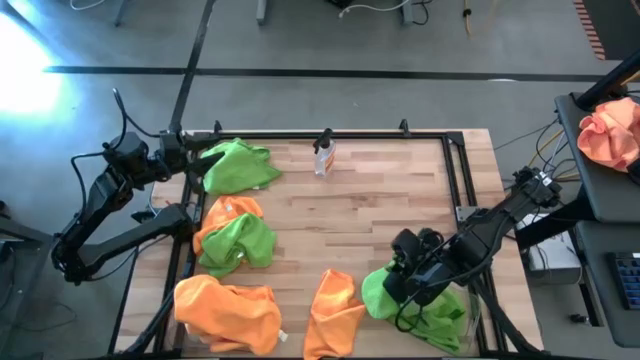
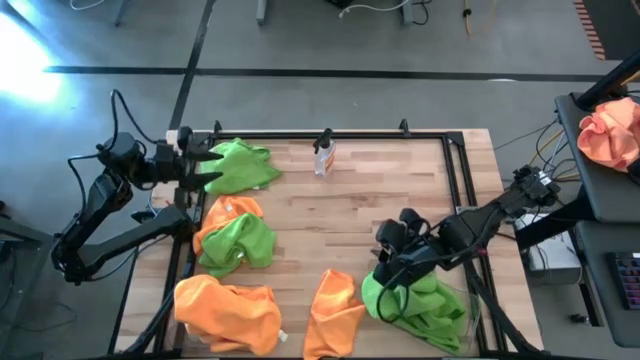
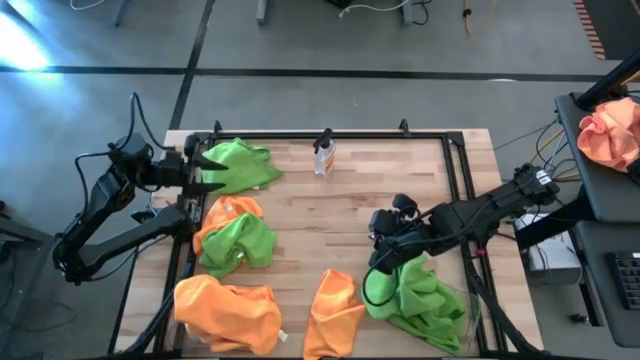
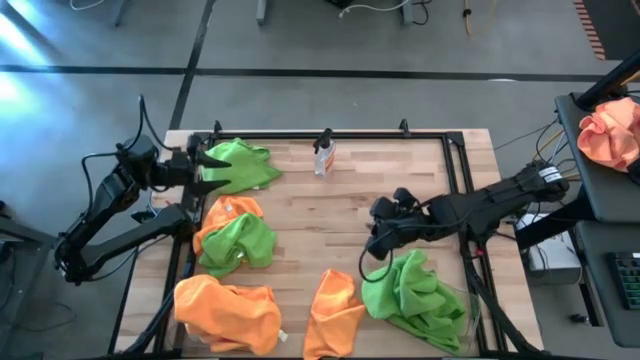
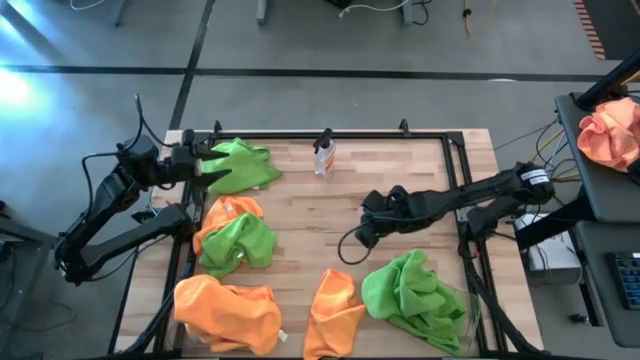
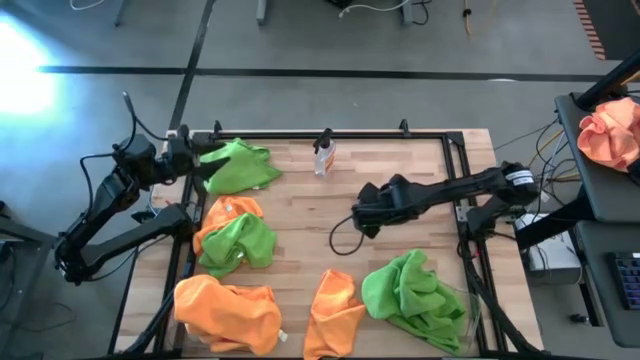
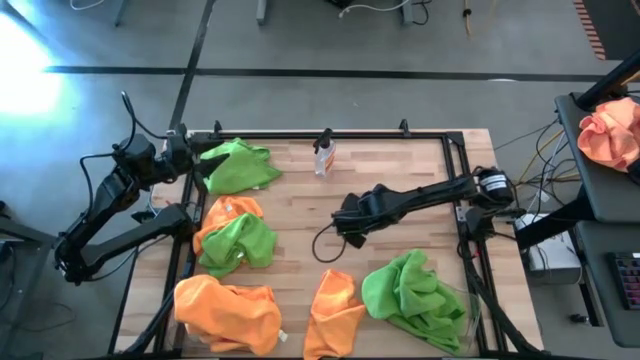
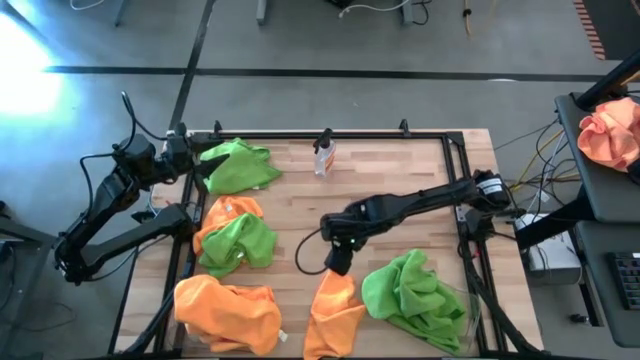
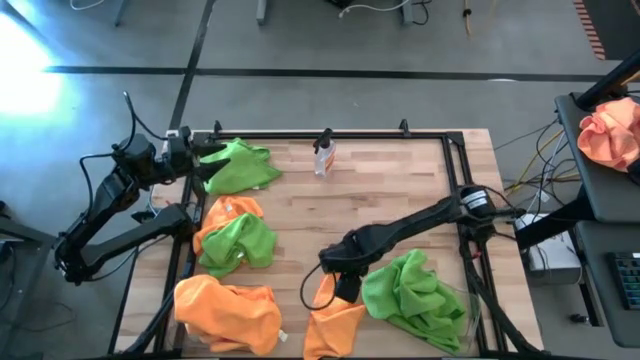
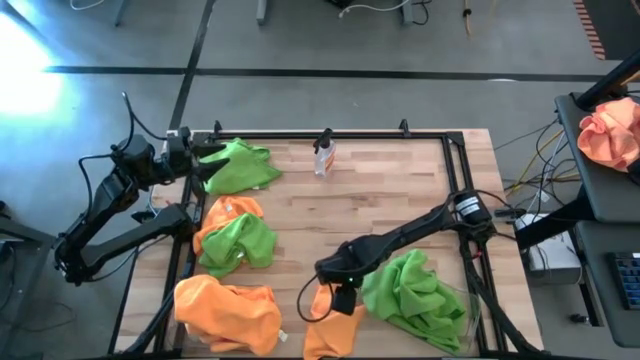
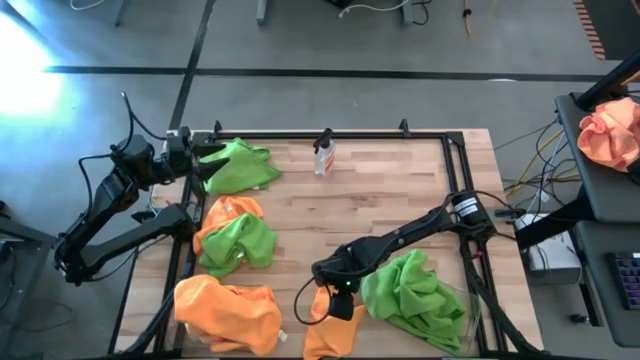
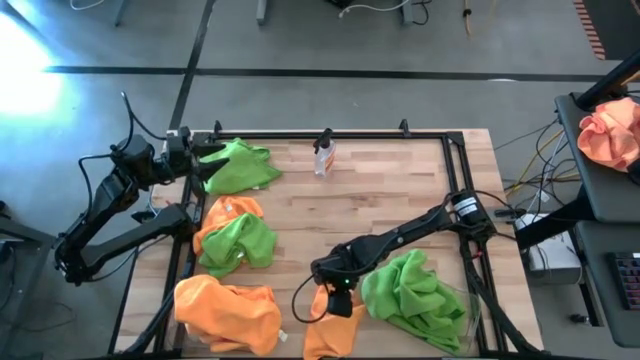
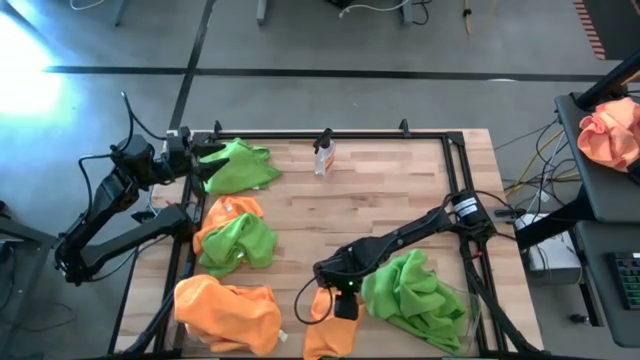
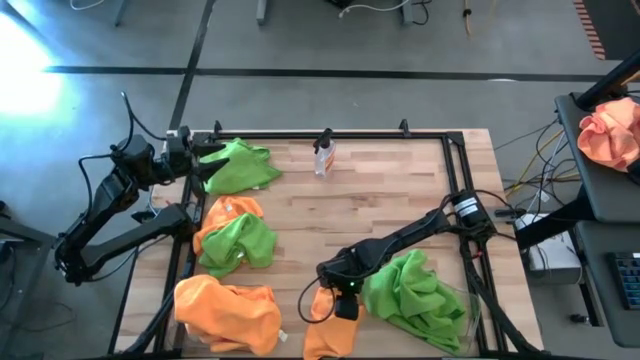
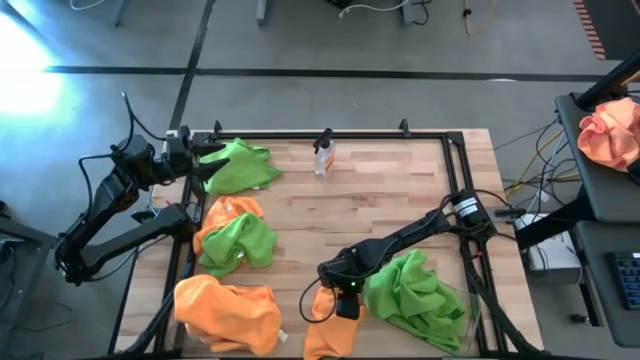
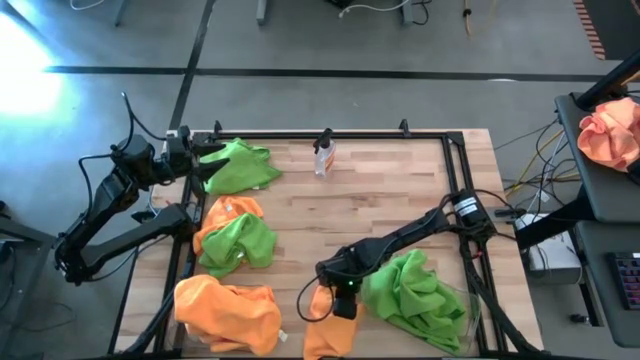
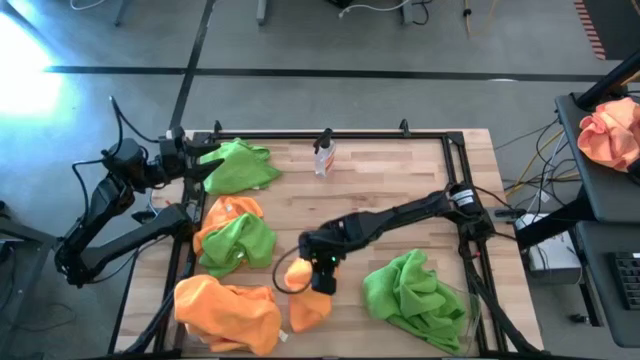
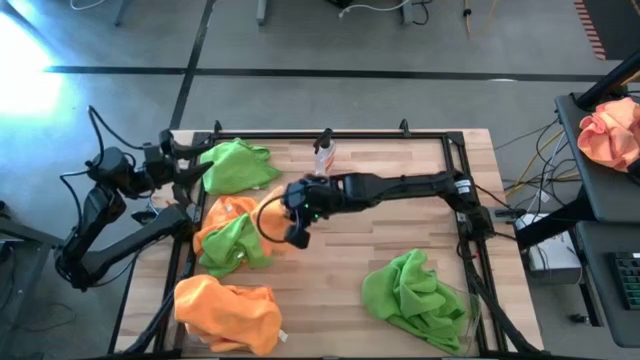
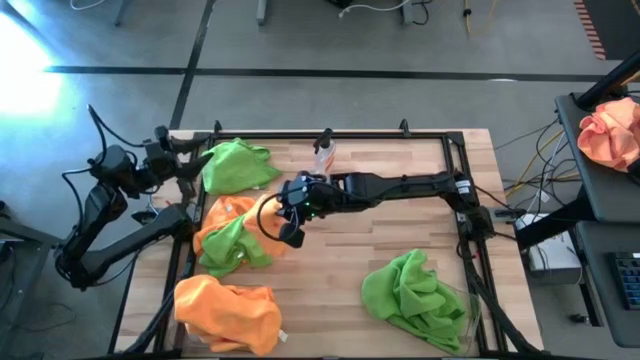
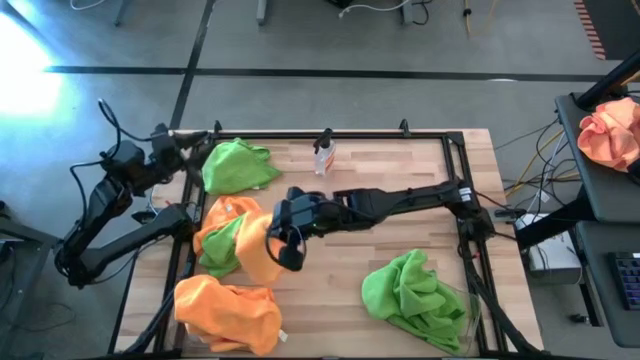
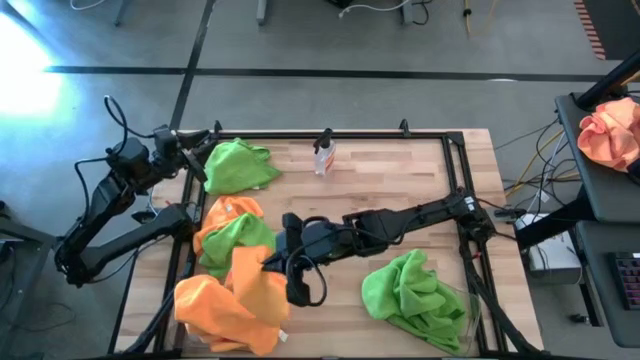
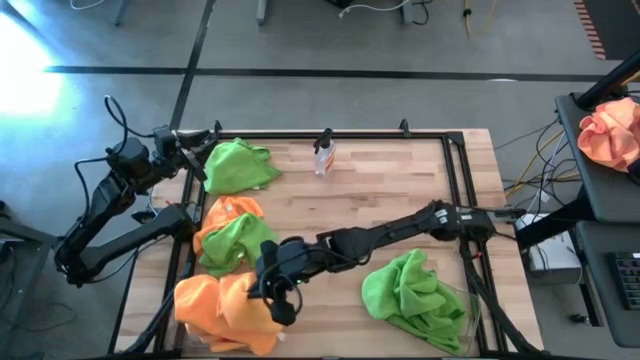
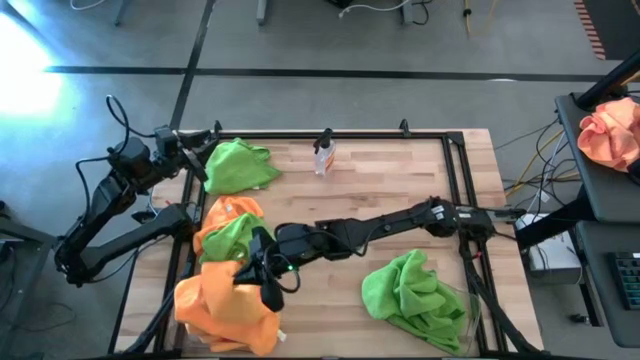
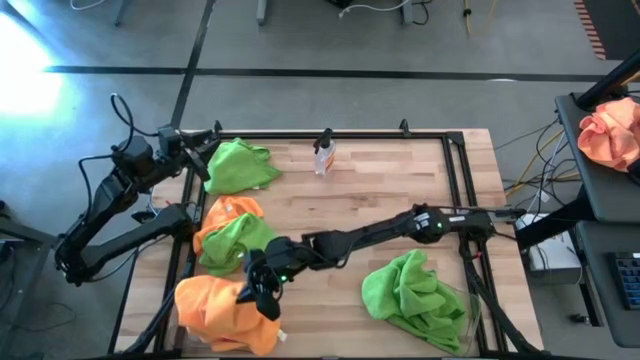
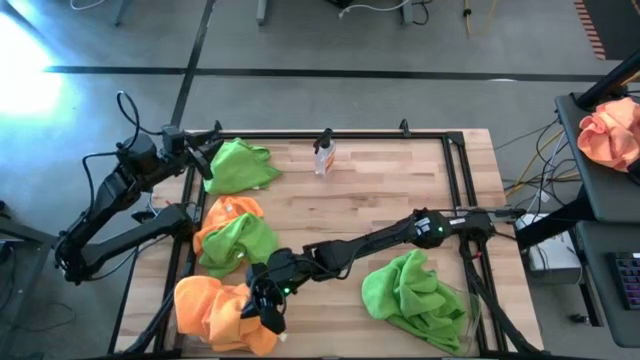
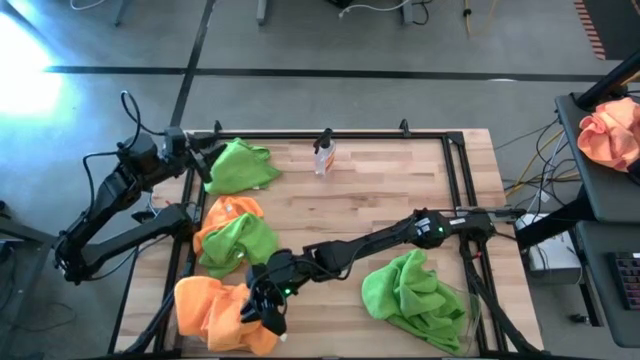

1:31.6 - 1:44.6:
Task: Sort microfiber towel by color & place in baskets
Put the orange microfiber cloth into the left transparent bin

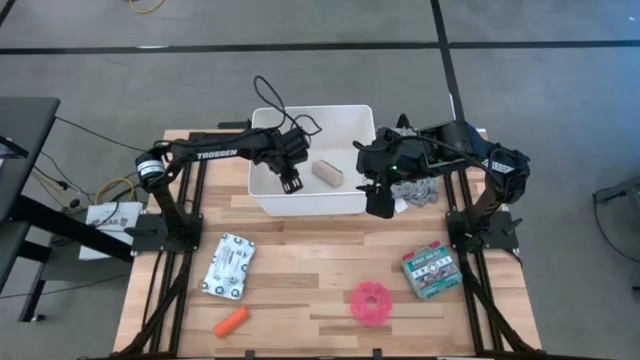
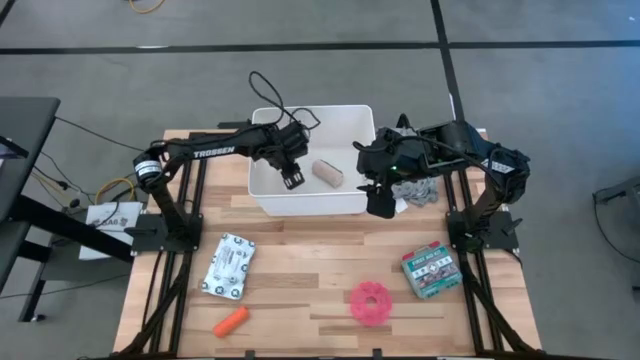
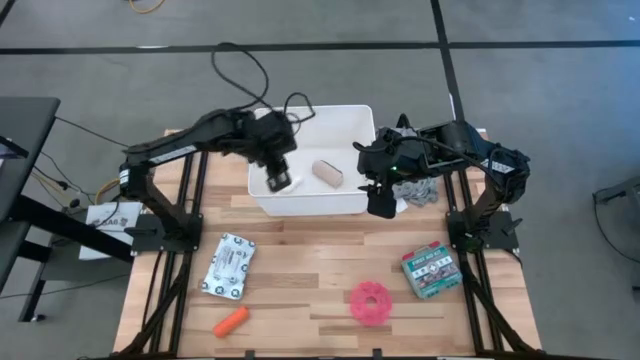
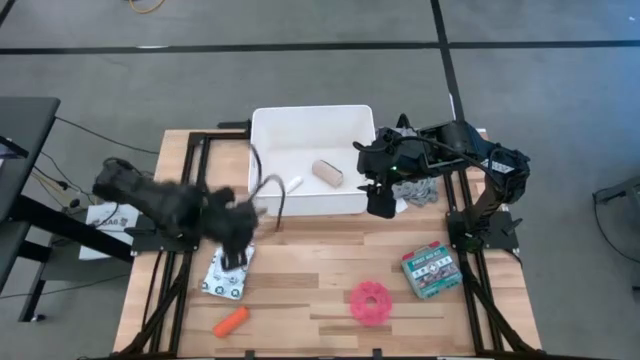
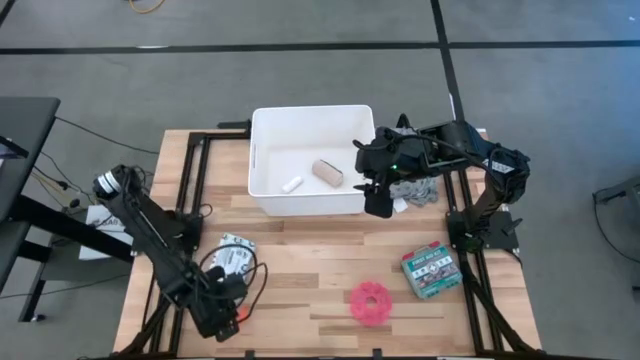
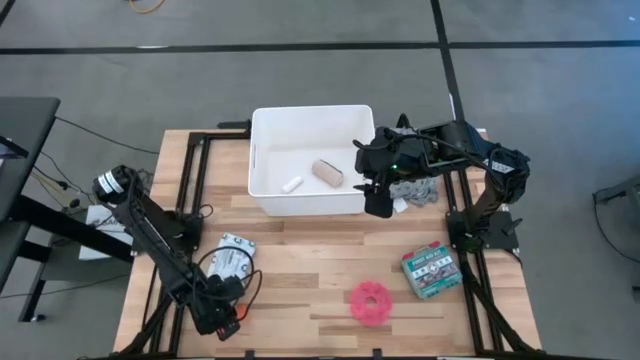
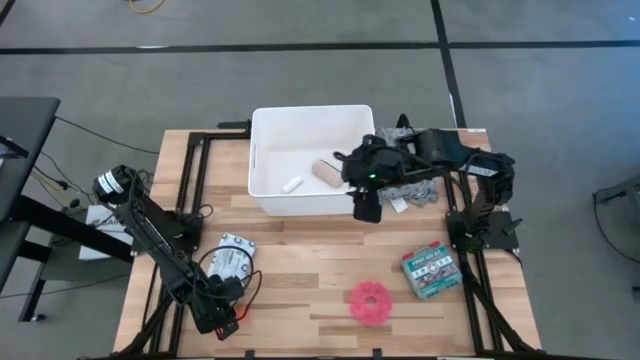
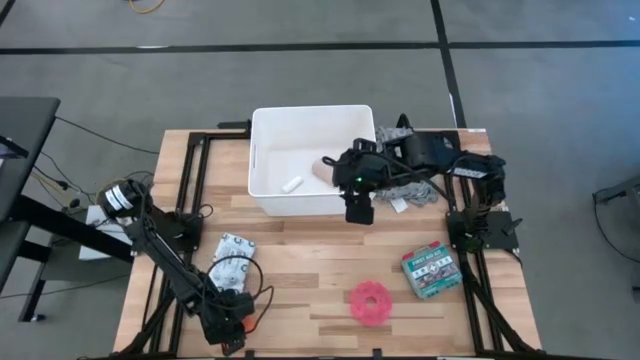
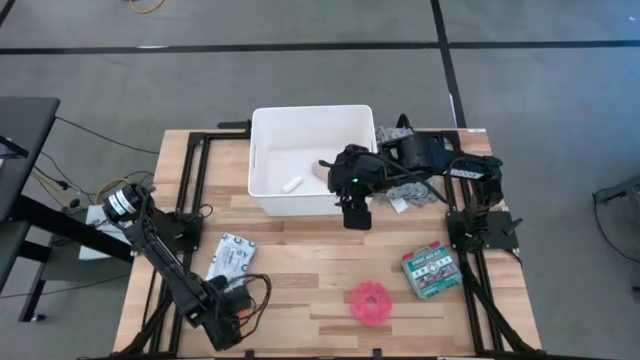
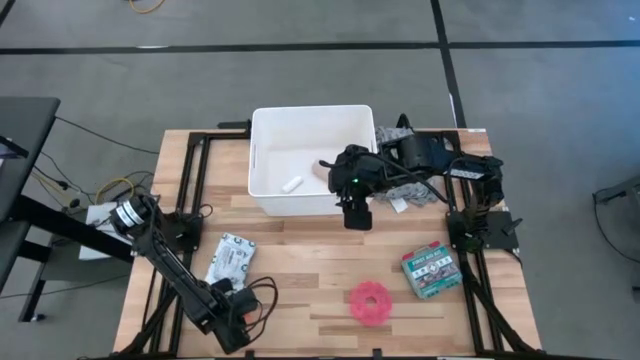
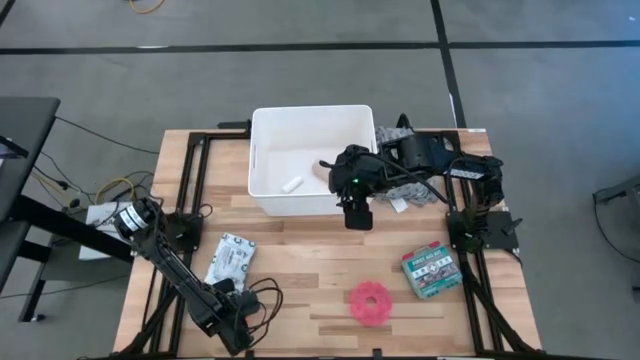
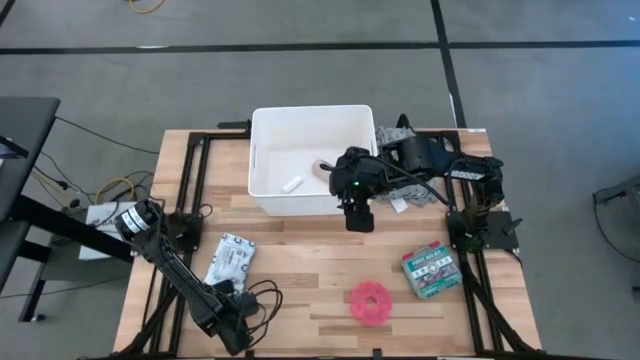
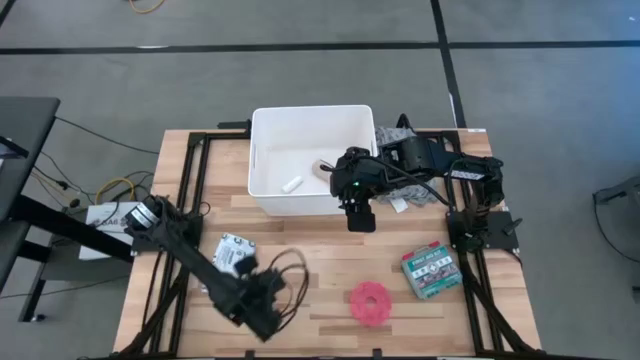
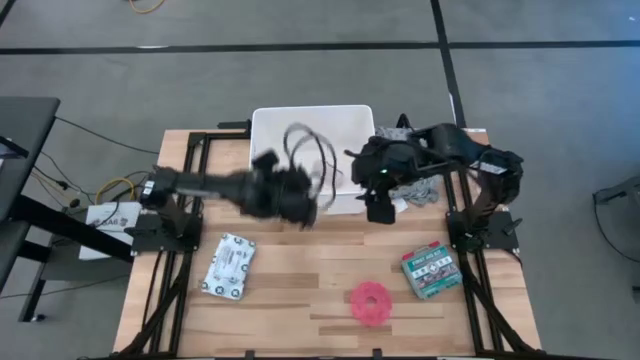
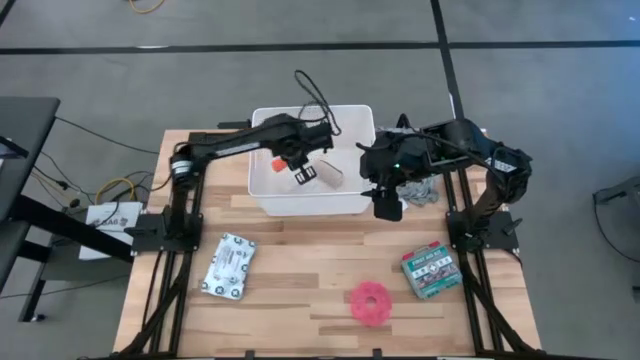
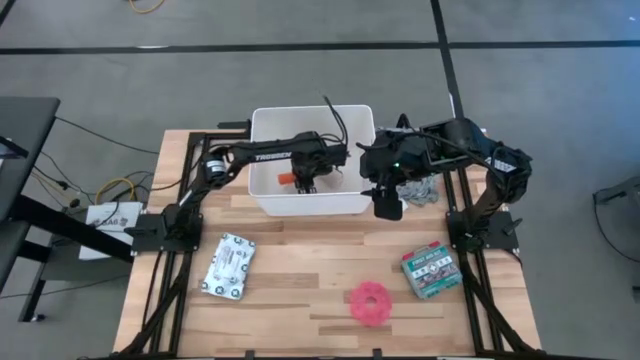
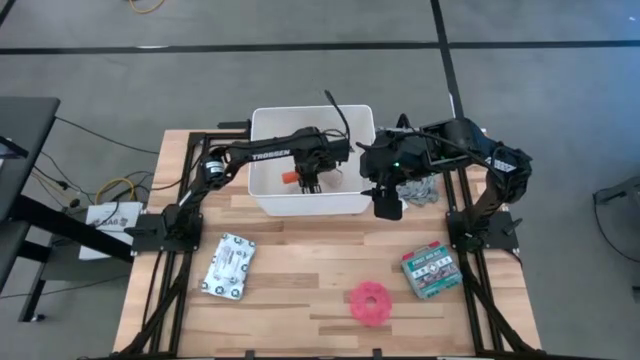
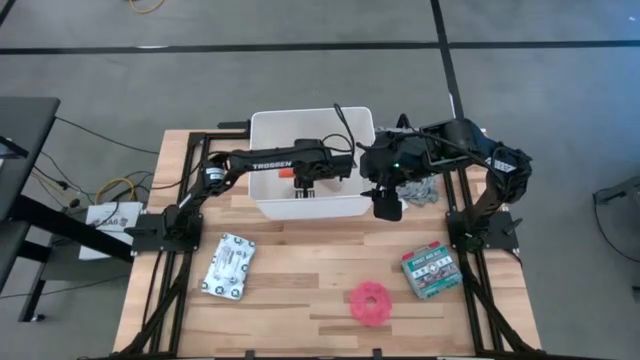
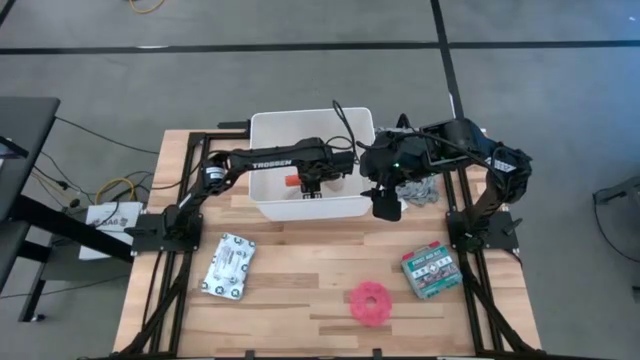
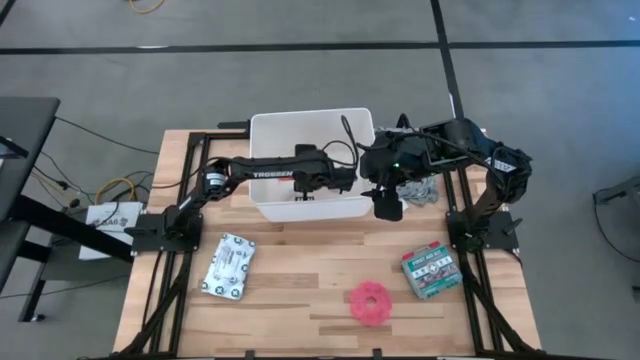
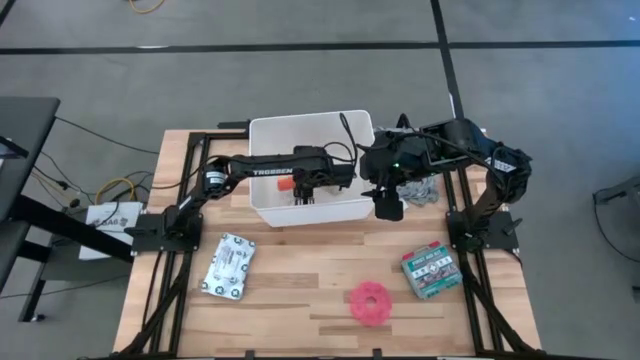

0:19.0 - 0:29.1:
Task: Pick & place medical supplies in basket/bin
Put the orange bandage into the white bin
